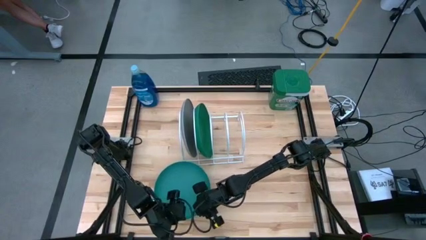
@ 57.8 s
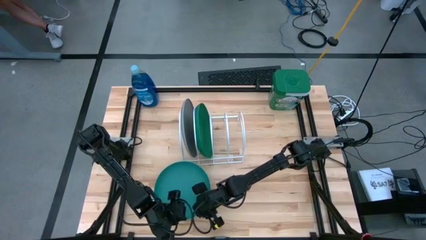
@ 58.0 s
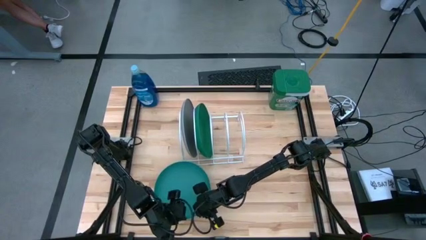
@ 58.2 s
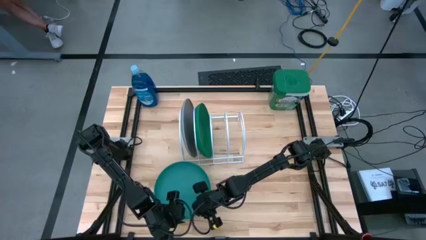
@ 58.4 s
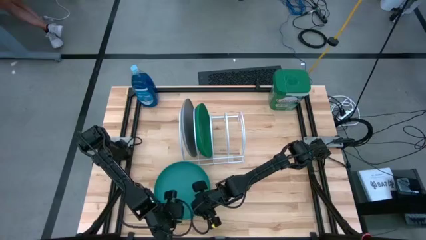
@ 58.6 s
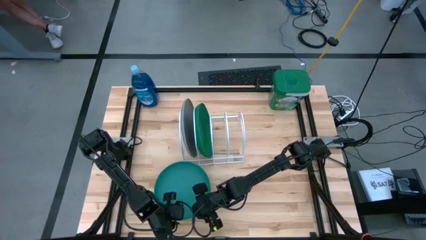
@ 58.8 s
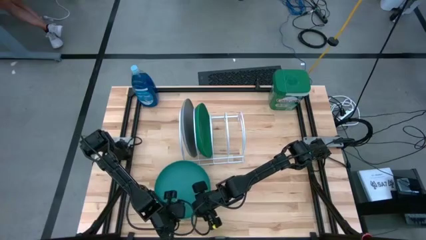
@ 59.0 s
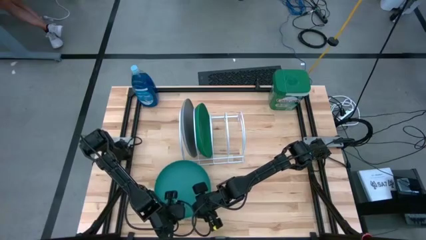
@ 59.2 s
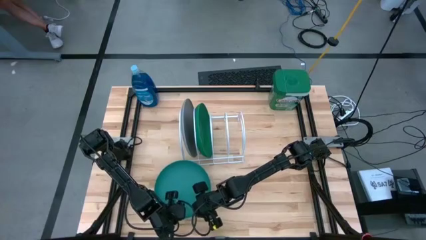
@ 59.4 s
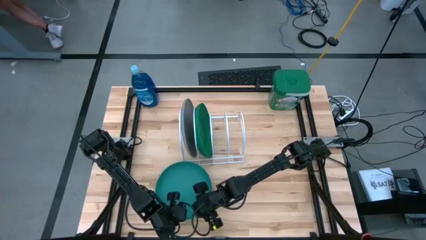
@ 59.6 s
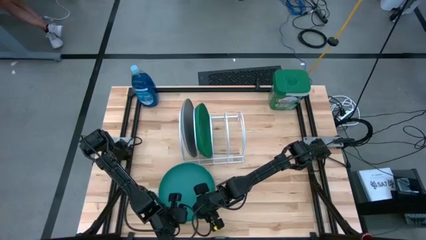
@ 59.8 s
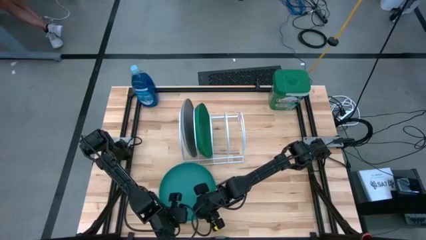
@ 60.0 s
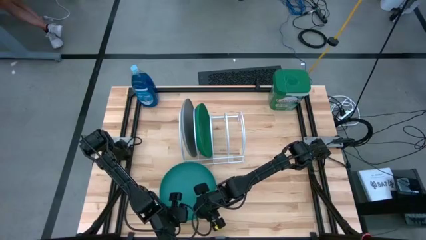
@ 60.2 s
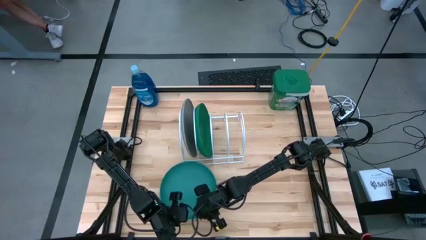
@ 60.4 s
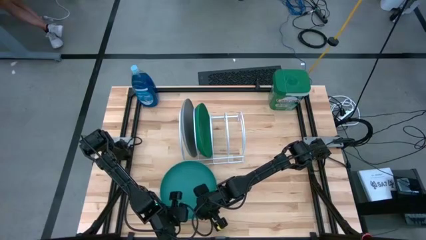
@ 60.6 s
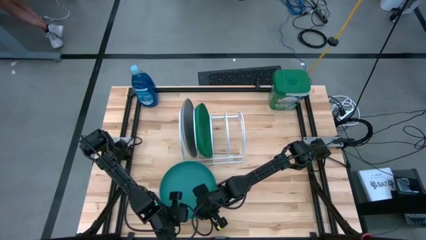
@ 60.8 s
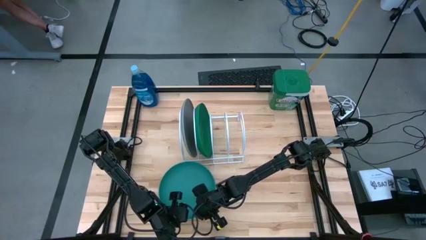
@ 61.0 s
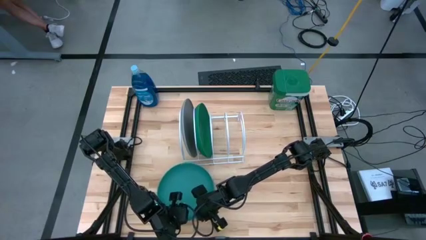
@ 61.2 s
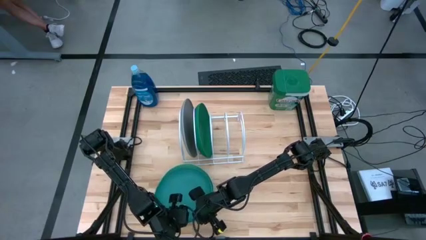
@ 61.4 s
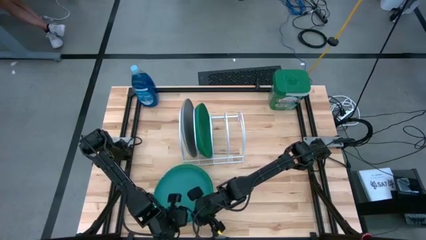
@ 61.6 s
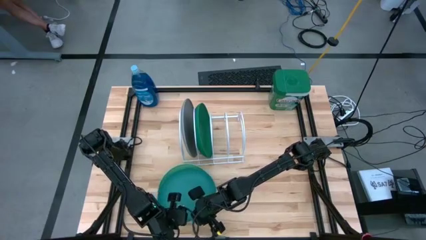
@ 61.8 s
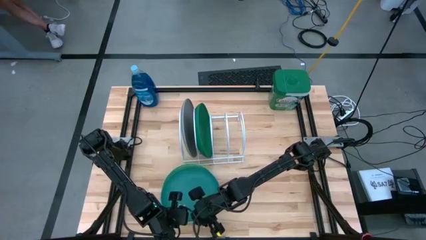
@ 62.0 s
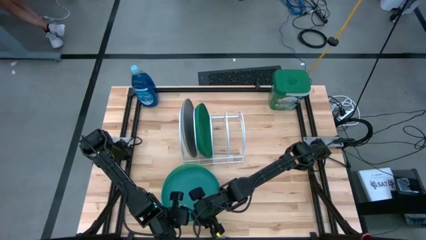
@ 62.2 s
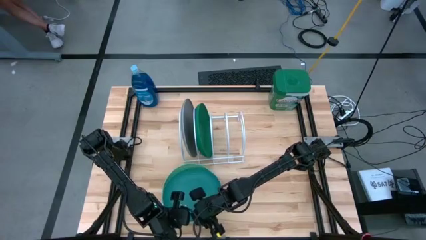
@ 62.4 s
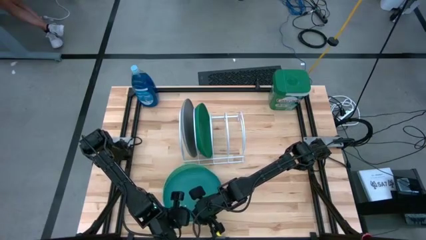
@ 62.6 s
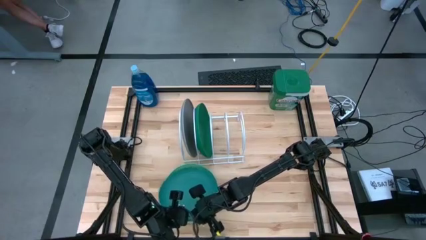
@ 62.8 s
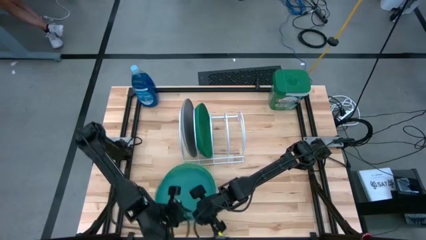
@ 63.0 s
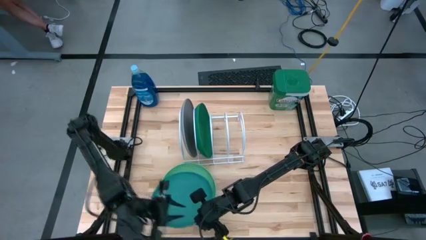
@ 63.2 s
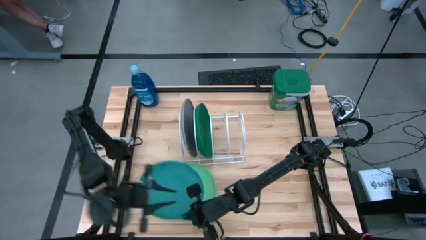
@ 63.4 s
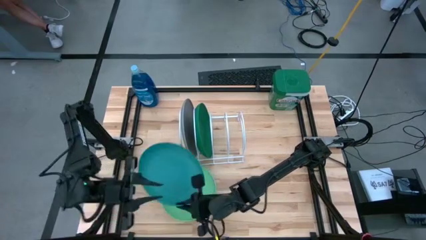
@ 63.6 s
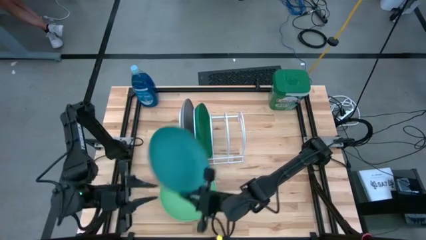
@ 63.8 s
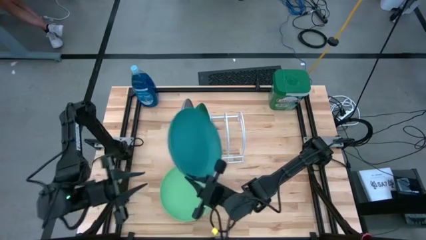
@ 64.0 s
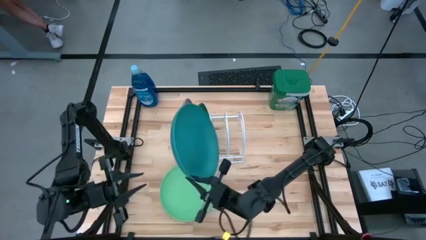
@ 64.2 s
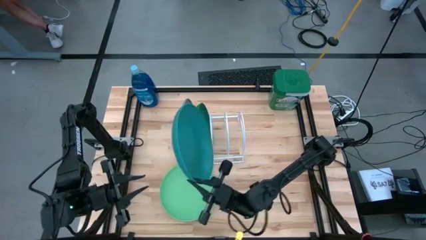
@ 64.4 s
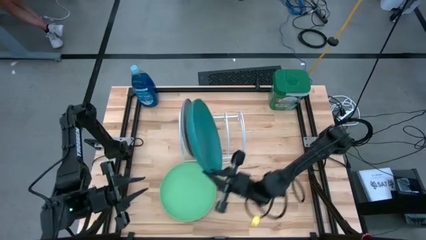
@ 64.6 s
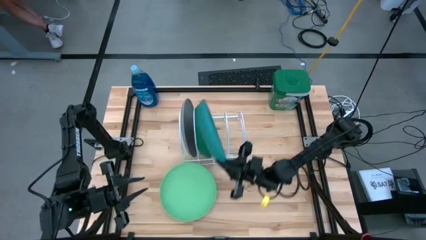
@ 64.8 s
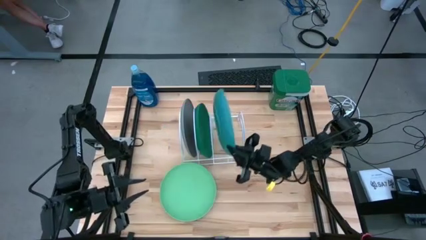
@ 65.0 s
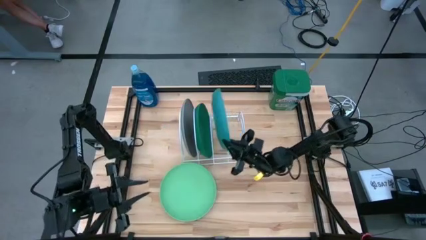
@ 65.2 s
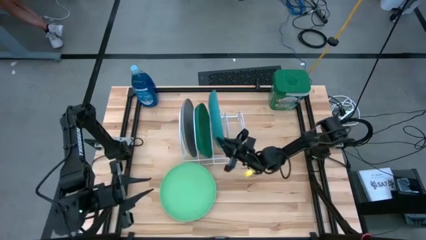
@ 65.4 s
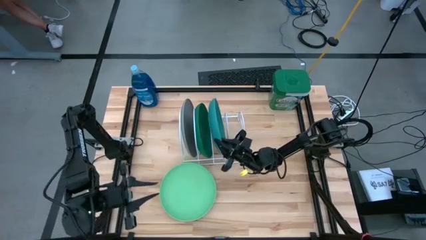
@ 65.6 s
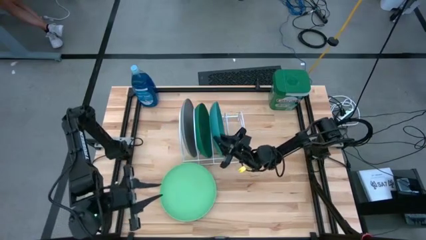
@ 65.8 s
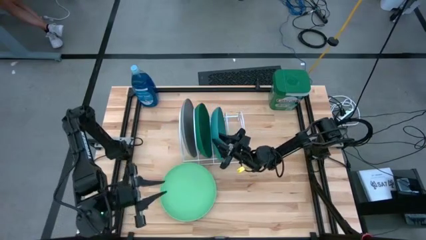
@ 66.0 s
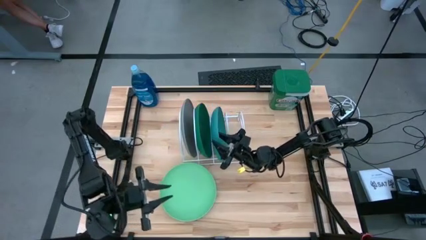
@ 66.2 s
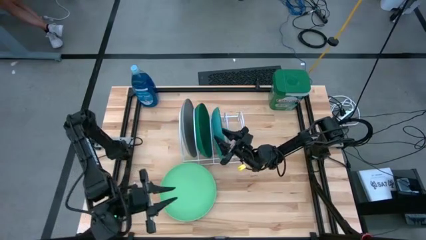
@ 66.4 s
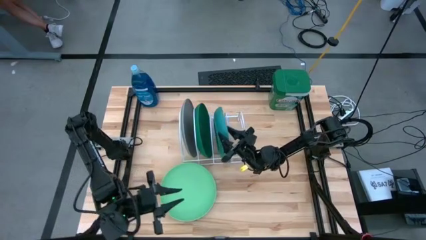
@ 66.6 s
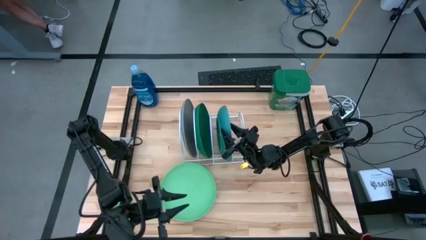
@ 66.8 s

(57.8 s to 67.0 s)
Task: Sort dishes
Put the blue plate into the dish rack

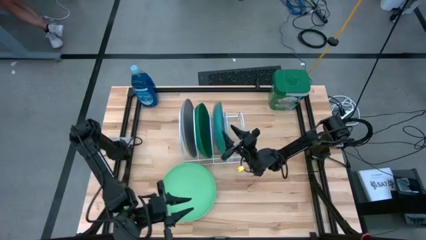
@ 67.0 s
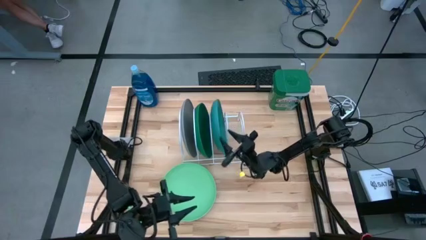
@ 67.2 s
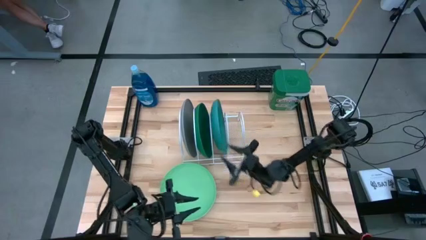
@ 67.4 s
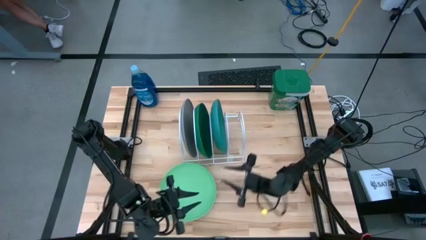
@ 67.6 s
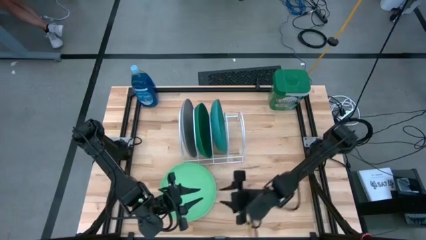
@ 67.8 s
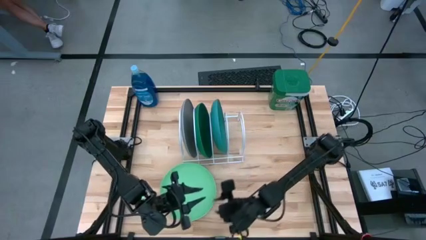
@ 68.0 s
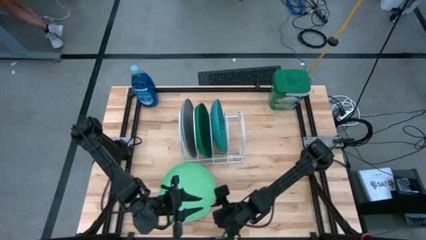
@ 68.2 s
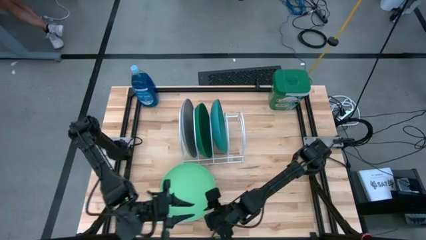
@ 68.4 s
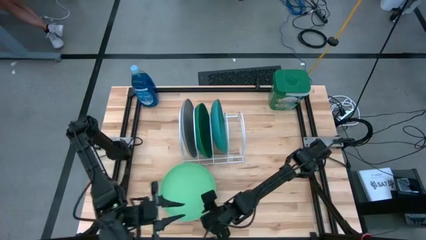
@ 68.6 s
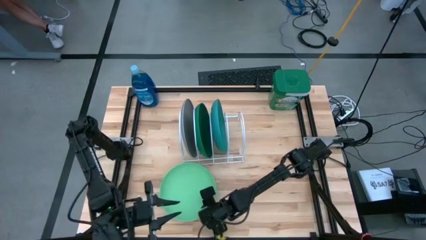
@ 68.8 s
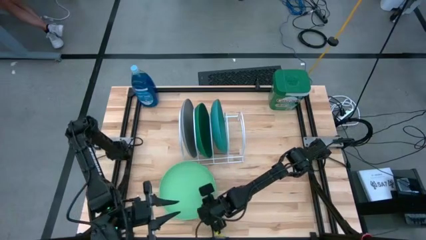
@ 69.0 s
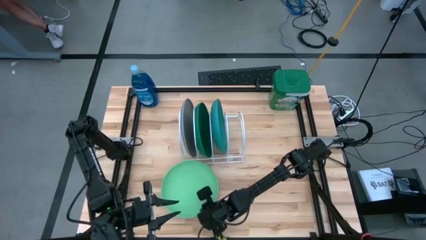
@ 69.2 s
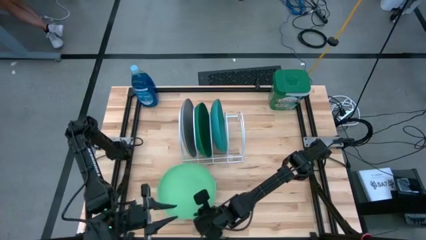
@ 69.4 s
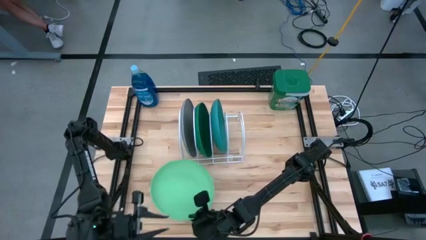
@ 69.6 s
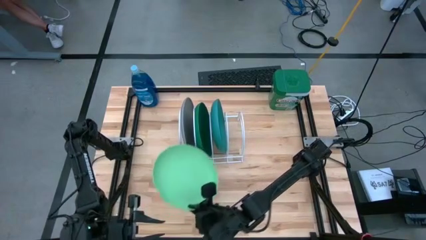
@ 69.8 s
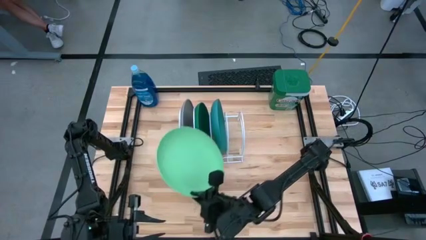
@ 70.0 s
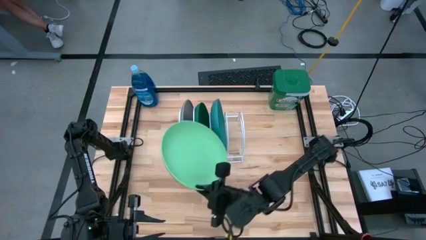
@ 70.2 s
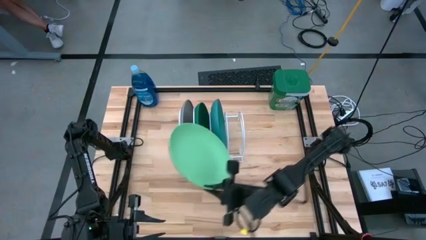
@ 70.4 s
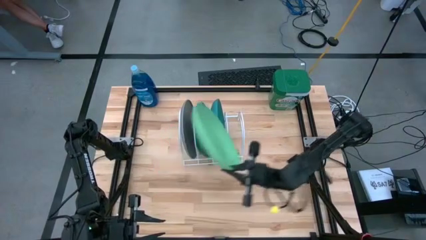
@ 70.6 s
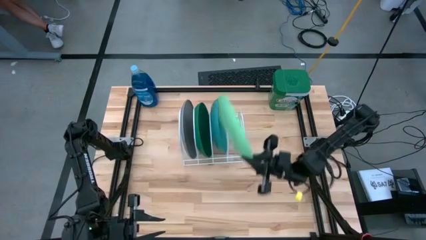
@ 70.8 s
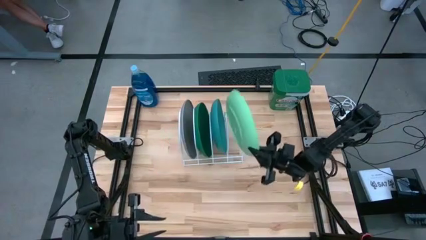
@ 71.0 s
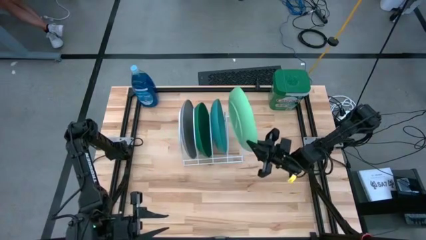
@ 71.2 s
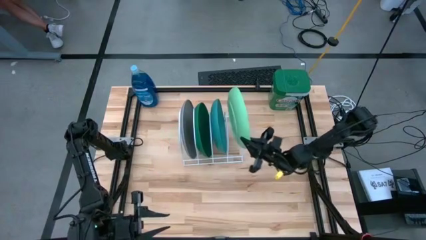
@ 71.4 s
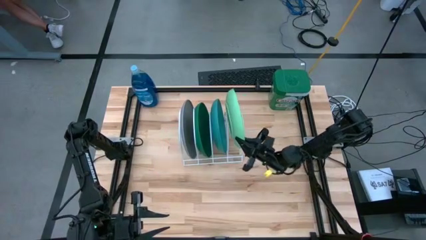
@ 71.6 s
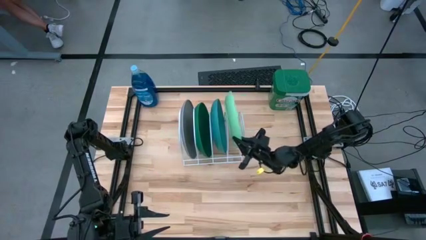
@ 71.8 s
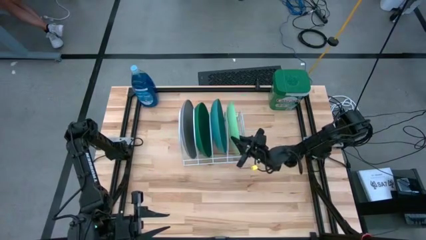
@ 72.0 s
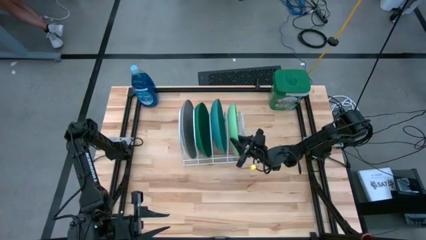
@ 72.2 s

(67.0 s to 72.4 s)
Put the light green plate into the dish rack
